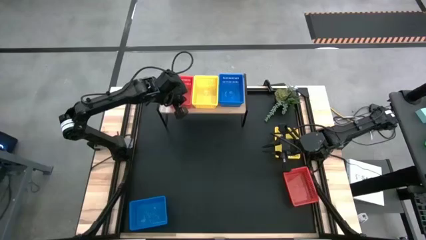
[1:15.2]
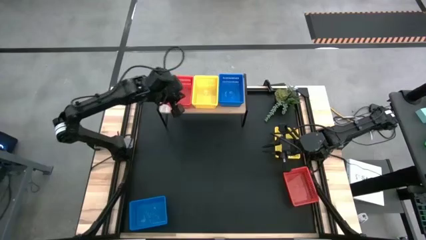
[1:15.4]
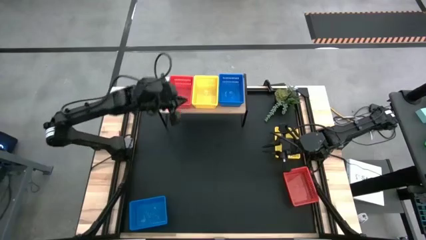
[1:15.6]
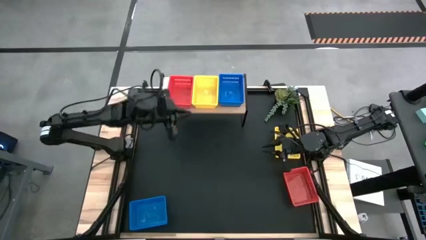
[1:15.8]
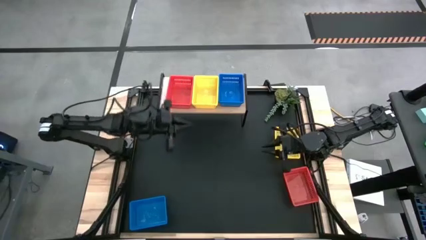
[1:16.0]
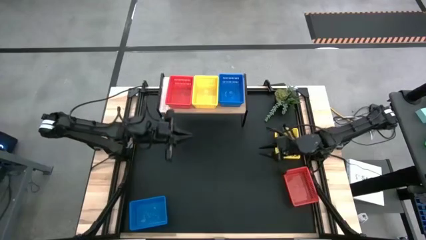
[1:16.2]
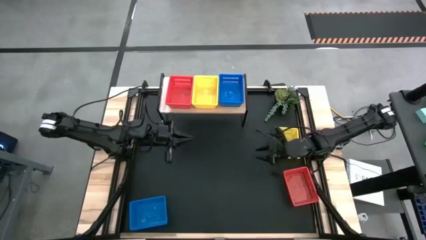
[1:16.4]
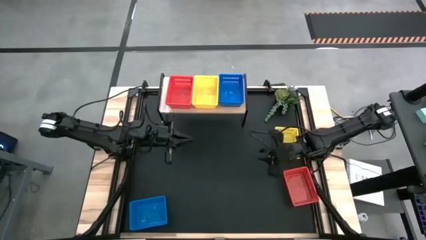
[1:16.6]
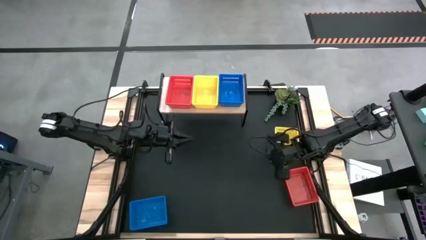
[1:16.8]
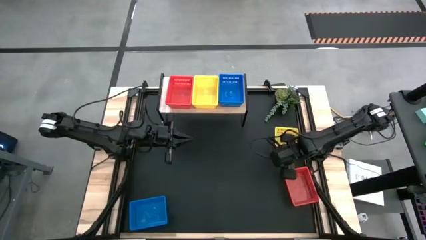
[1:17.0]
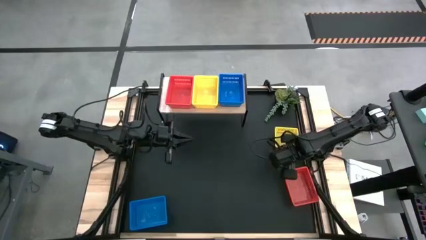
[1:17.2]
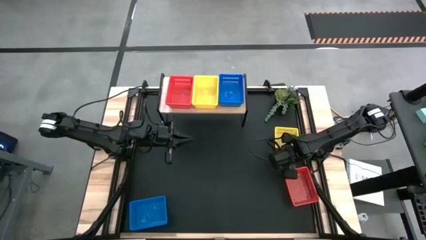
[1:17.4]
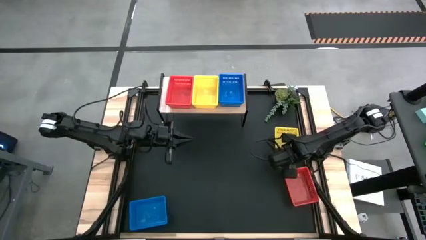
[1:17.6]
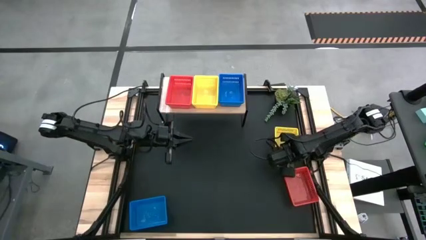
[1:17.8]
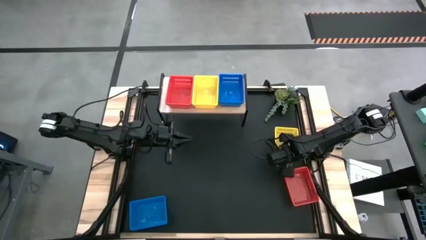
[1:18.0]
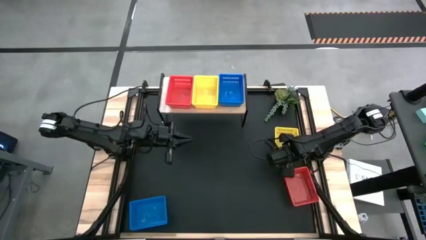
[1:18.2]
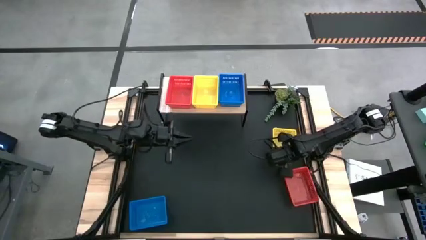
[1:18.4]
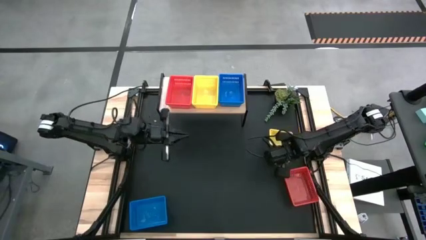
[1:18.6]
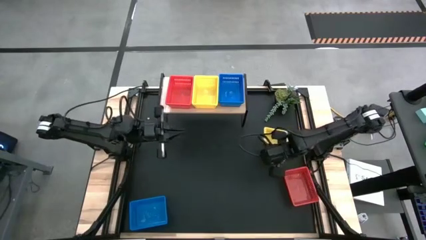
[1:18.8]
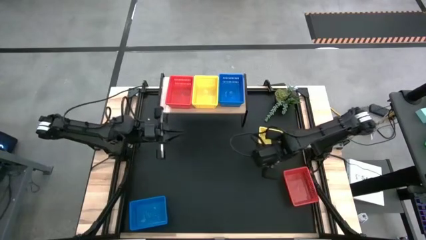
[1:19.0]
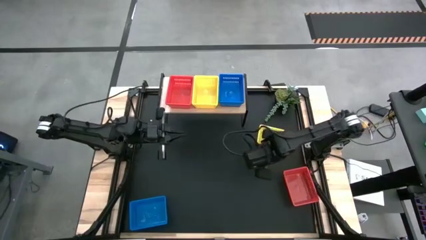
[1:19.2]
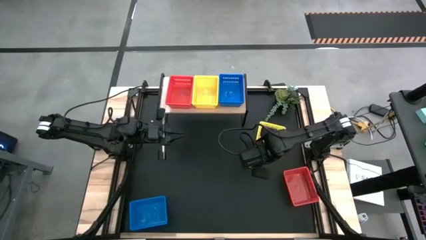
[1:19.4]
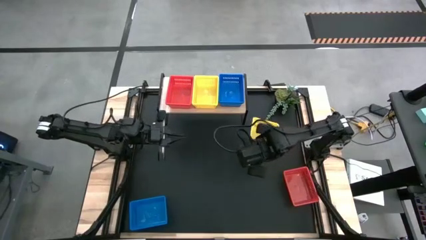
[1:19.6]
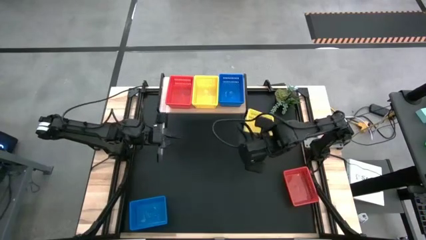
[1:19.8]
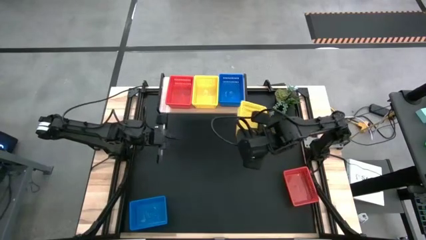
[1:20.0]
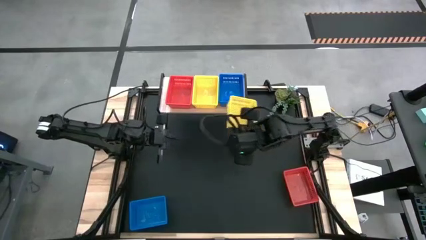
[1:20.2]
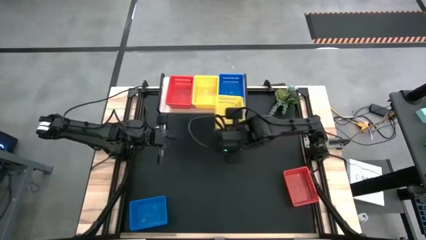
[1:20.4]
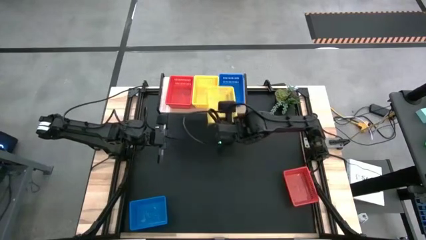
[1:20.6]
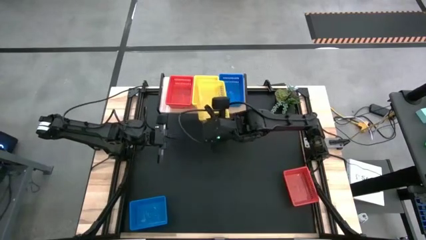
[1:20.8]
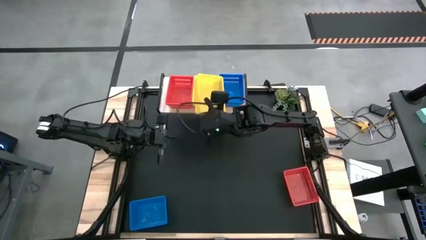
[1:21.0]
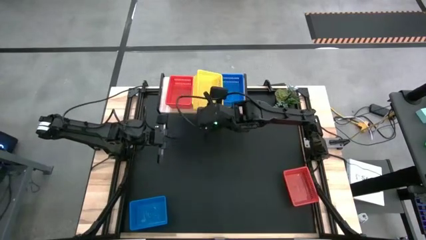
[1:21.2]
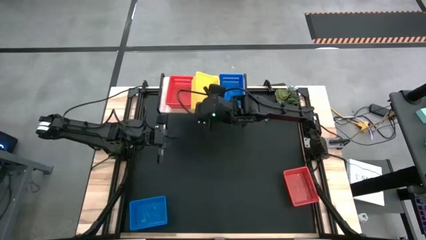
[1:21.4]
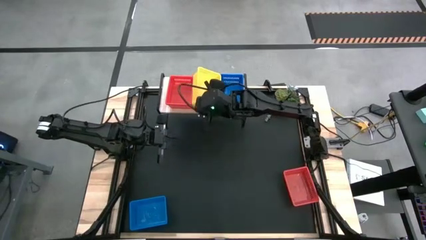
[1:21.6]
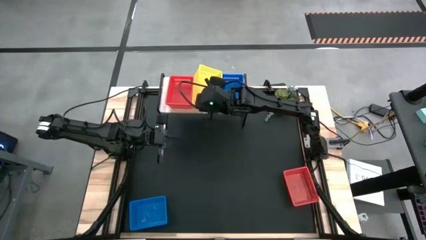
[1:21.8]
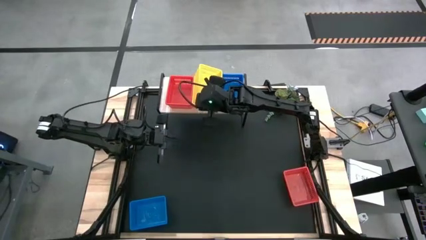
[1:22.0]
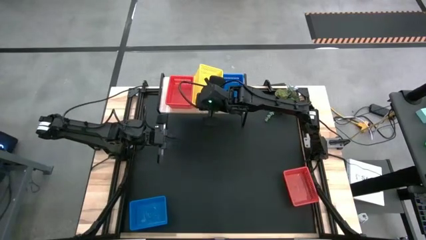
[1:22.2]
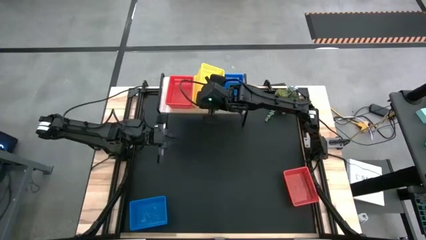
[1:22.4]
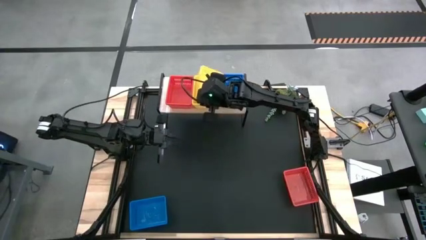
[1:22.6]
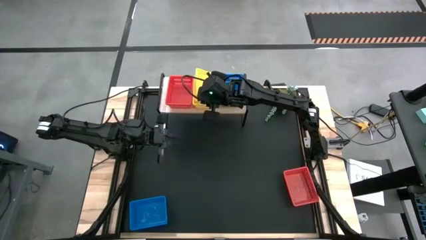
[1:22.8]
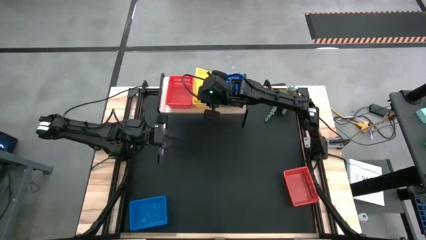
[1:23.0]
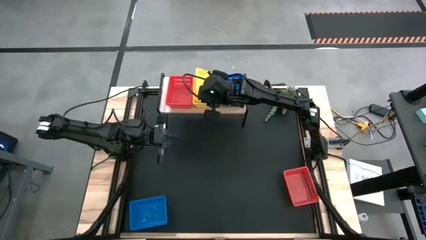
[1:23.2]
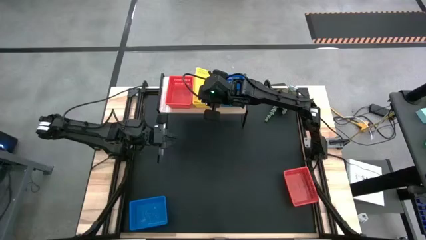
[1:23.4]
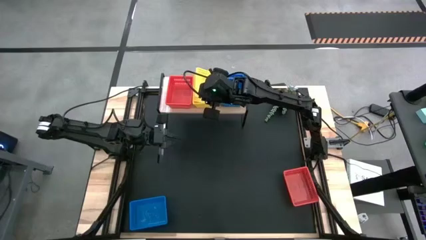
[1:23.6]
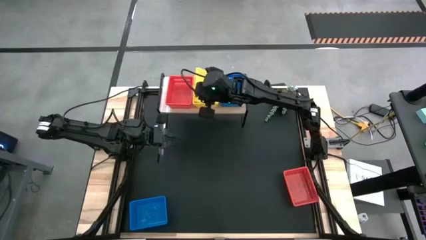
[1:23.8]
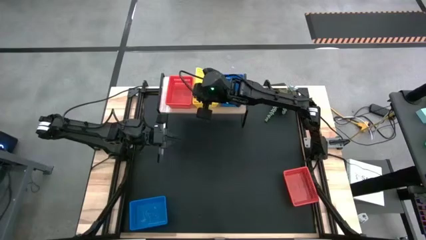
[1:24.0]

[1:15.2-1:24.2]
Task: Stack baskets on shelf by color
Stack the yellow bin on top of the yellow bin on the shelf

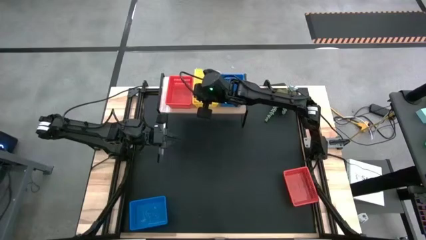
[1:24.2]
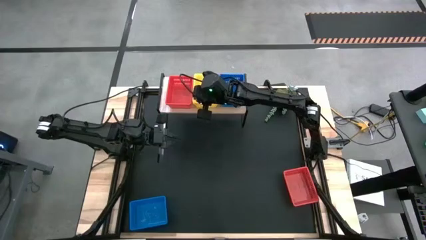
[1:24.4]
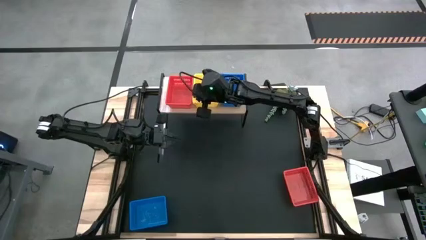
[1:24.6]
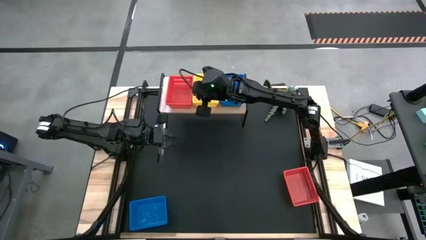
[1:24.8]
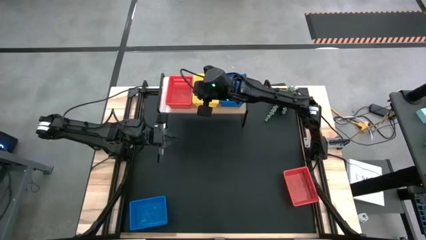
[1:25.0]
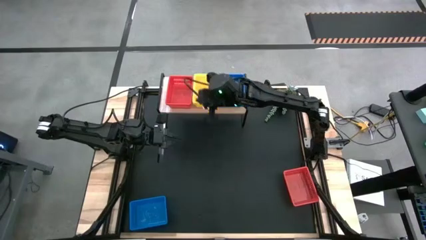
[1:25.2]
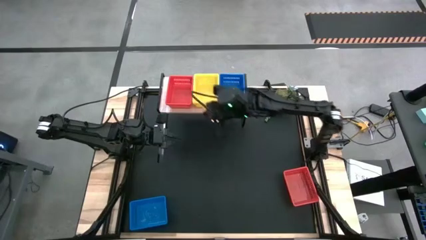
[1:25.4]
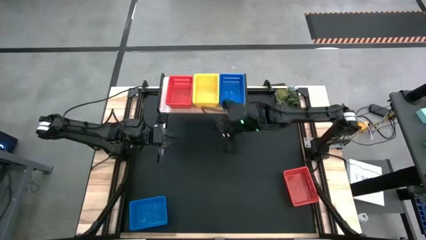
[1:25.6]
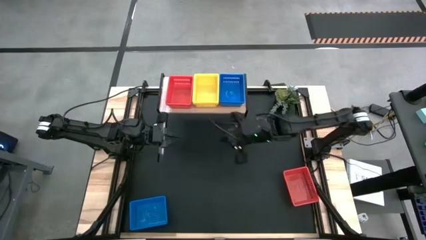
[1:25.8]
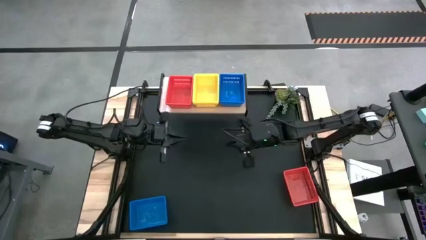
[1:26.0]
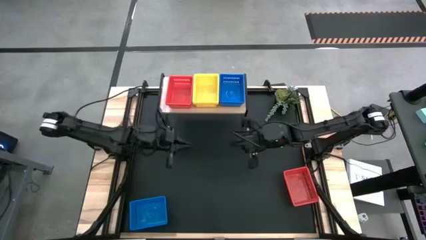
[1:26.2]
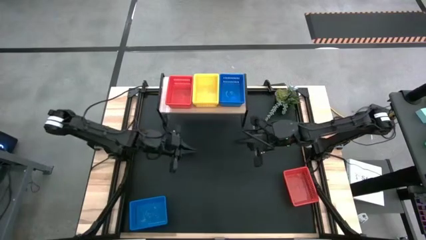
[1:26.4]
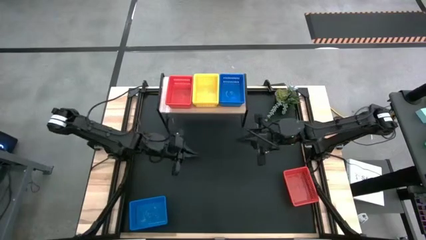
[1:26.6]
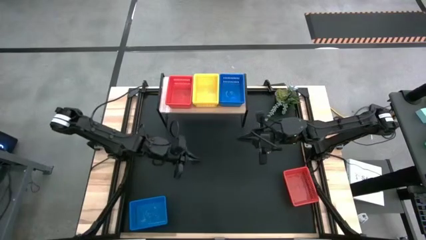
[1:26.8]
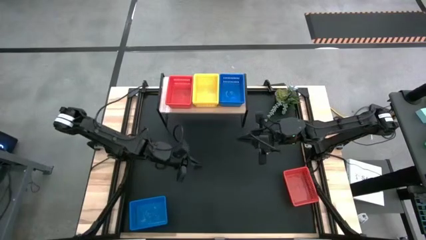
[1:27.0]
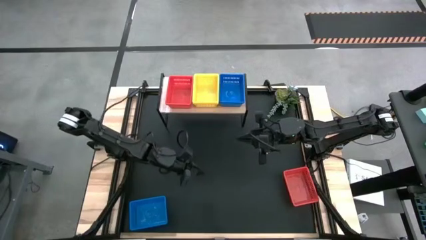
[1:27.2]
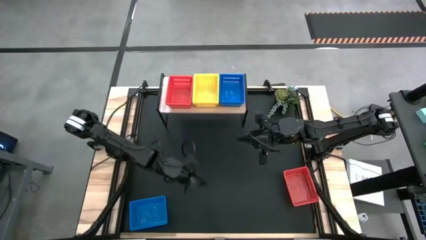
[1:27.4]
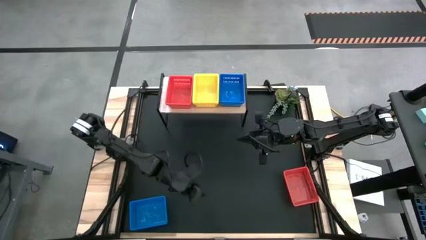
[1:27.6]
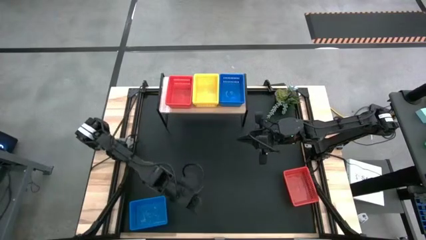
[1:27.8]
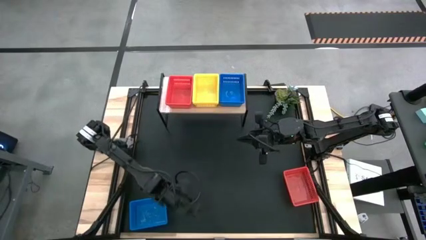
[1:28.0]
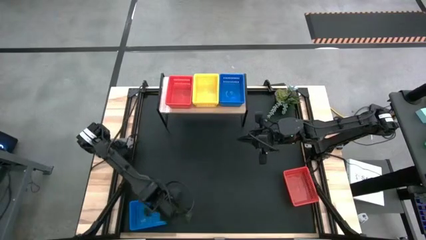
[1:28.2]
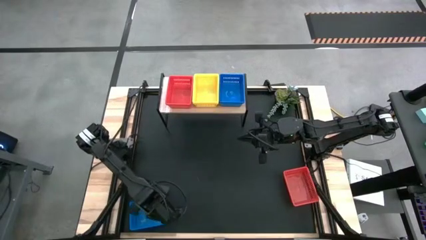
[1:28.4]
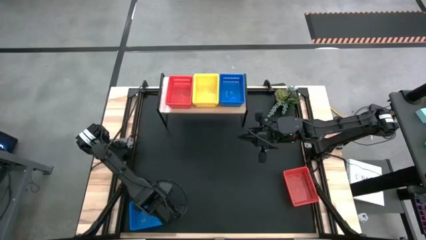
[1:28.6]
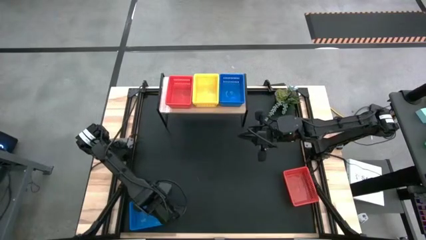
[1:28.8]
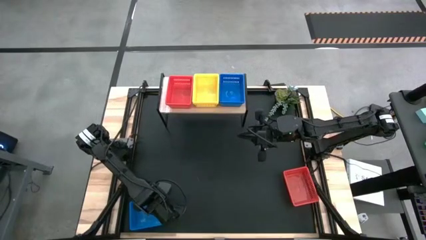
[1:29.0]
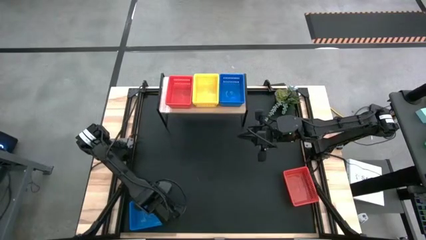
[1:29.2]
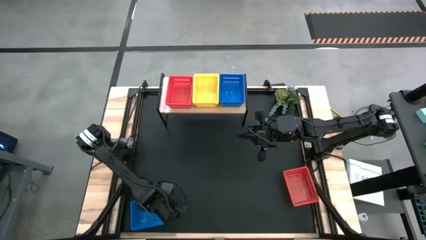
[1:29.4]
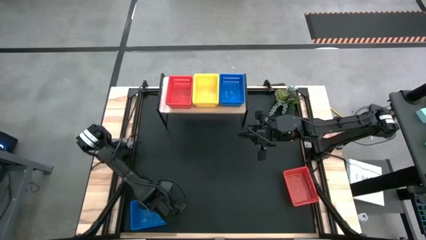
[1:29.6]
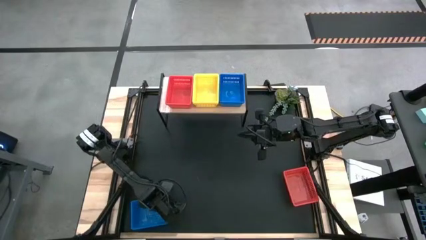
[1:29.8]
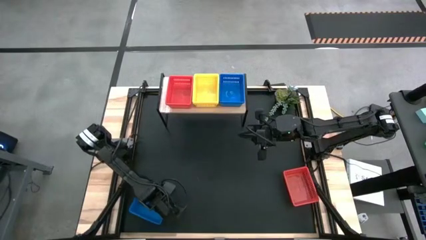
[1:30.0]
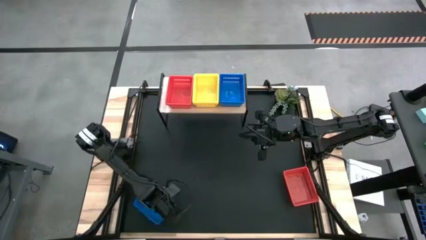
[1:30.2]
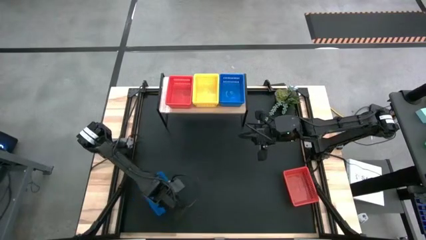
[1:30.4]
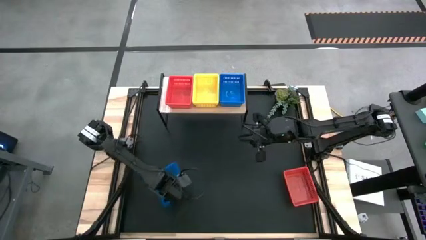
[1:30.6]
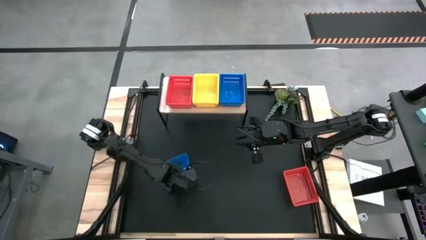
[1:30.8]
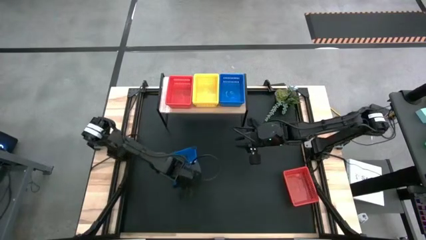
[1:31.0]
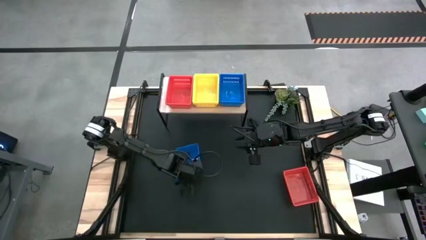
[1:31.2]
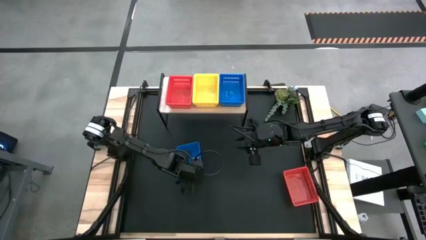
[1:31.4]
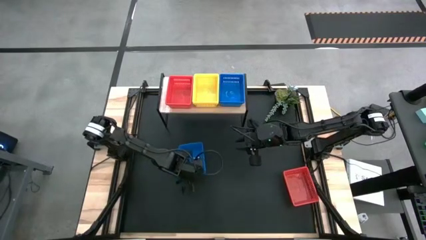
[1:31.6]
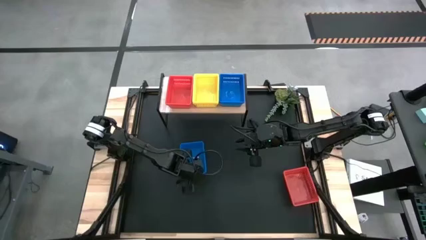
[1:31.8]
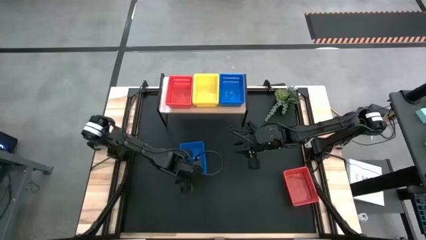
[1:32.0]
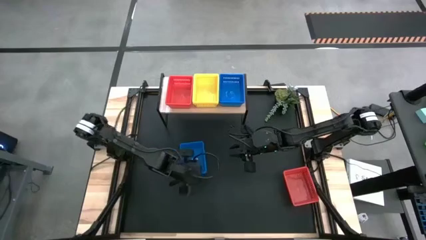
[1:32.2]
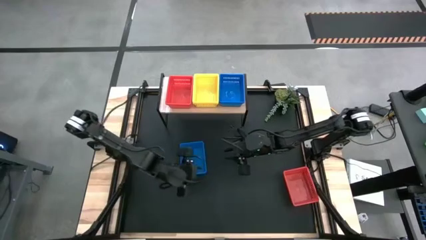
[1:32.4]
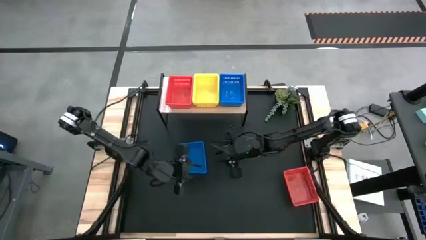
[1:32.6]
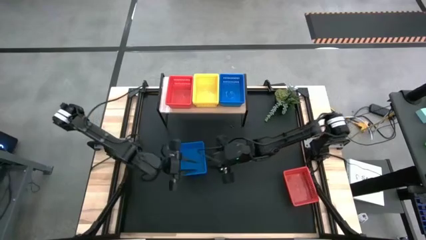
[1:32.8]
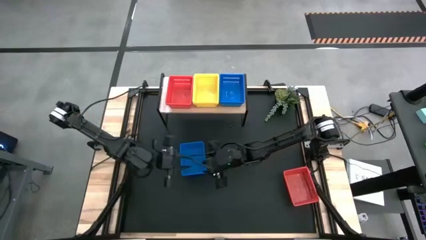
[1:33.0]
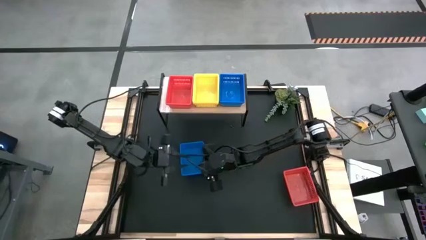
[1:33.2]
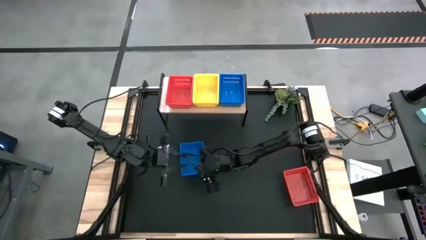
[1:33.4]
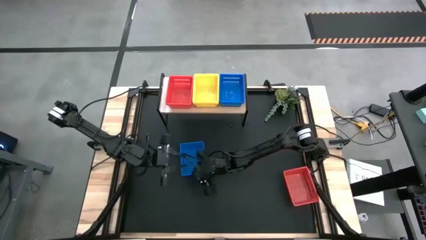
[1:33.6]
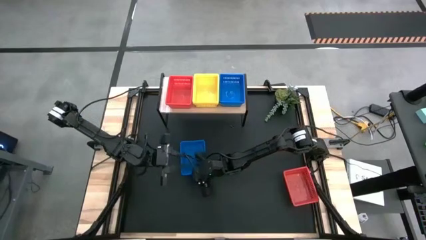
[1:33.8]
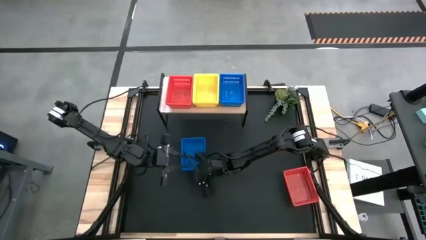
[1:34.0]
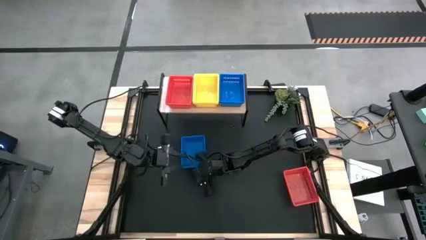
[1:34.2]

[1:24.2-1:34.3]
Stack the blue bin on top of the blue bin on the shelf
